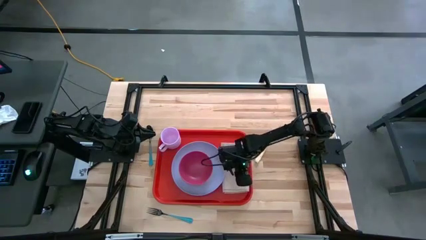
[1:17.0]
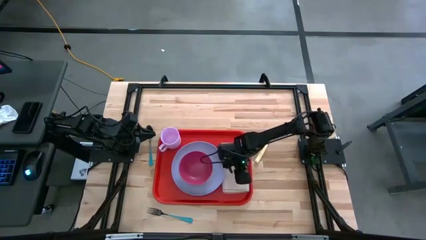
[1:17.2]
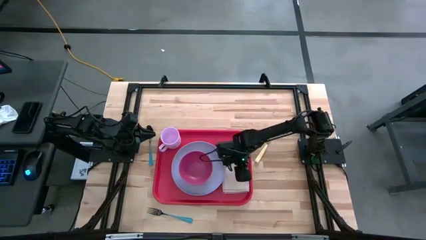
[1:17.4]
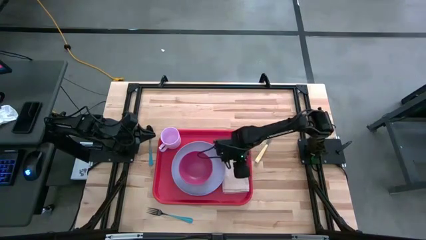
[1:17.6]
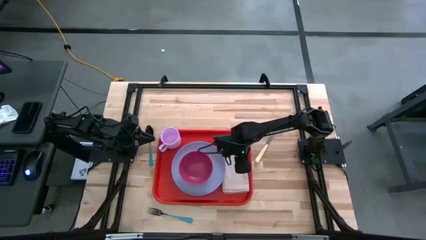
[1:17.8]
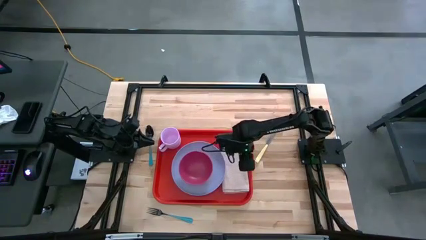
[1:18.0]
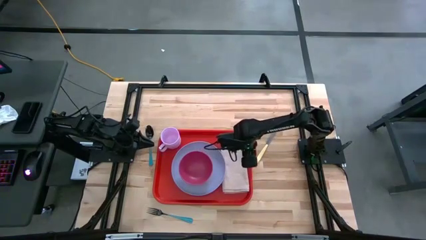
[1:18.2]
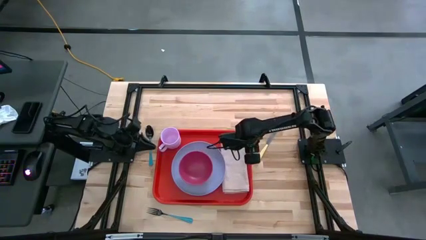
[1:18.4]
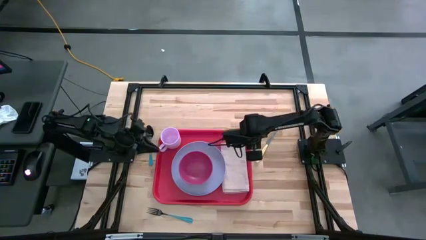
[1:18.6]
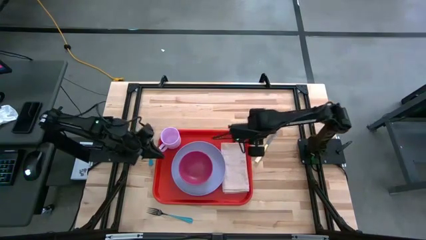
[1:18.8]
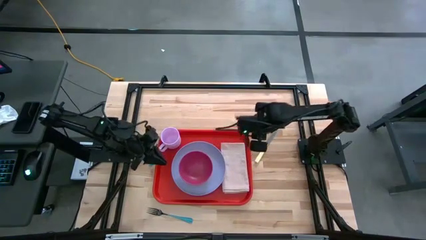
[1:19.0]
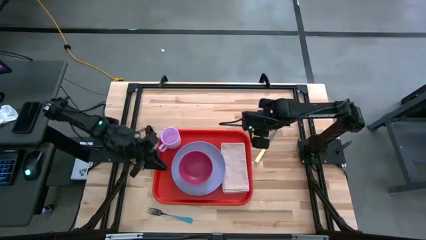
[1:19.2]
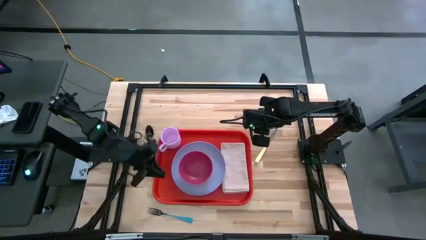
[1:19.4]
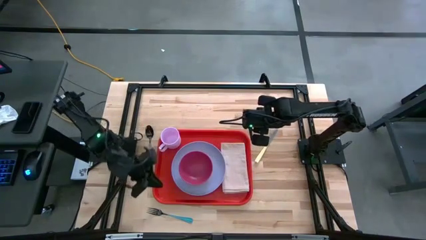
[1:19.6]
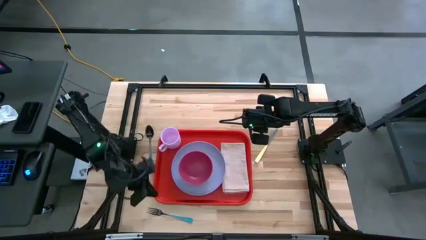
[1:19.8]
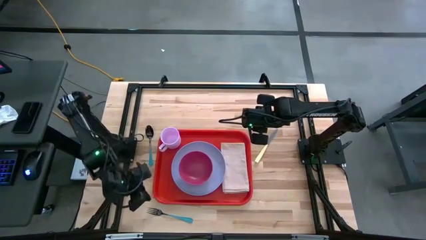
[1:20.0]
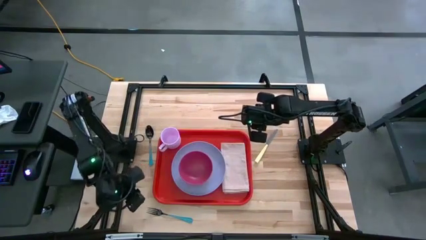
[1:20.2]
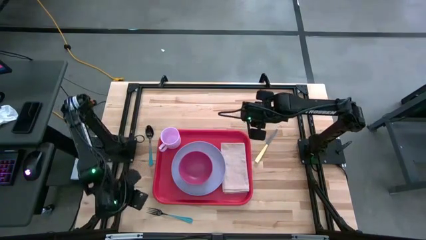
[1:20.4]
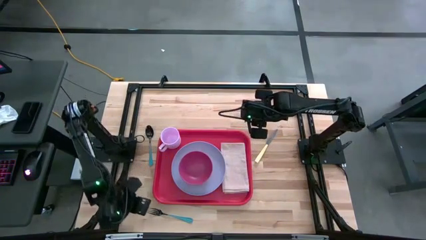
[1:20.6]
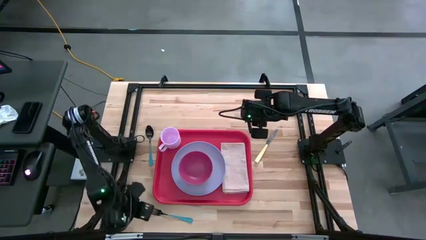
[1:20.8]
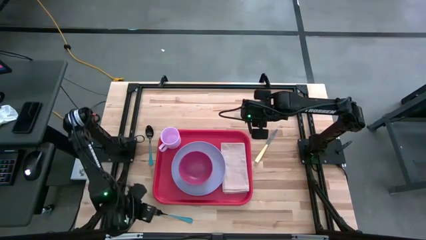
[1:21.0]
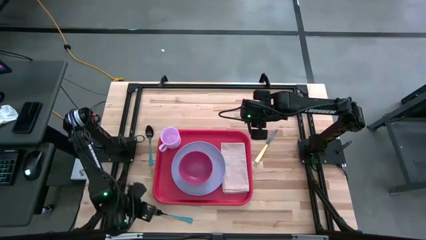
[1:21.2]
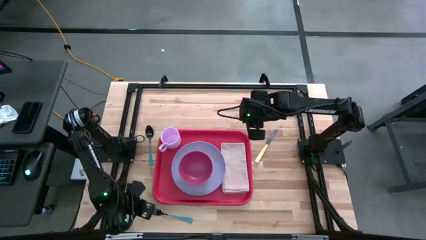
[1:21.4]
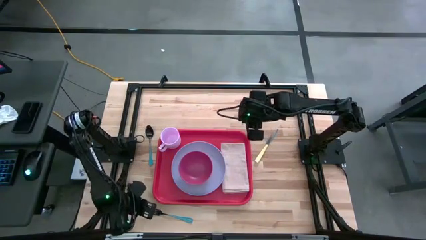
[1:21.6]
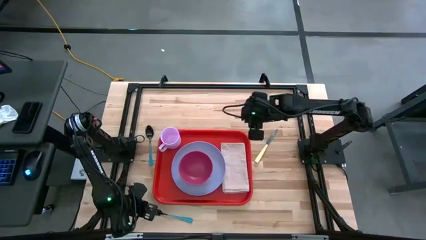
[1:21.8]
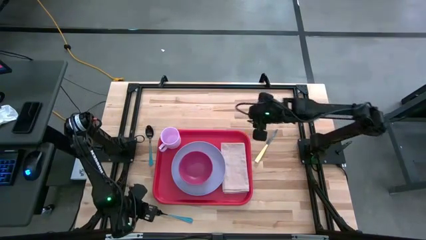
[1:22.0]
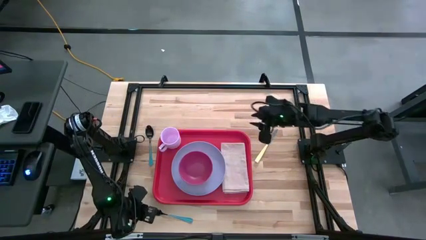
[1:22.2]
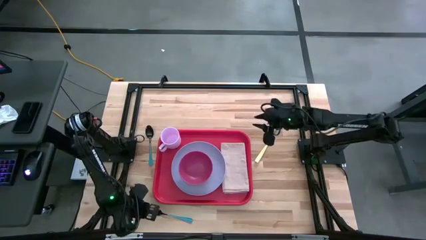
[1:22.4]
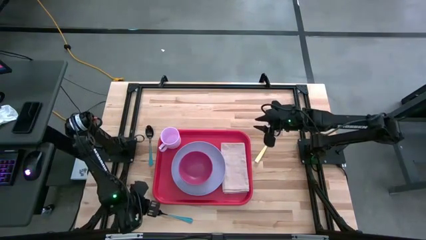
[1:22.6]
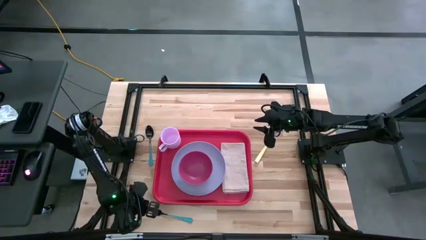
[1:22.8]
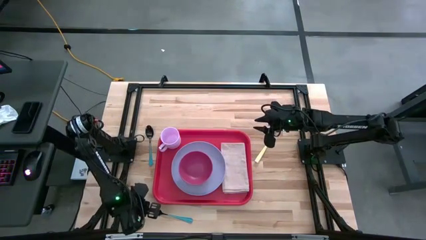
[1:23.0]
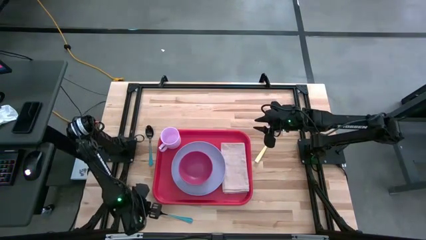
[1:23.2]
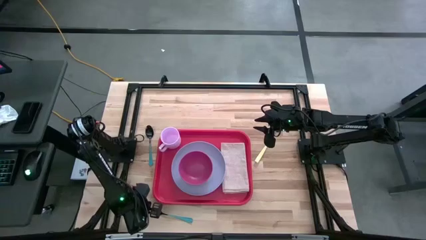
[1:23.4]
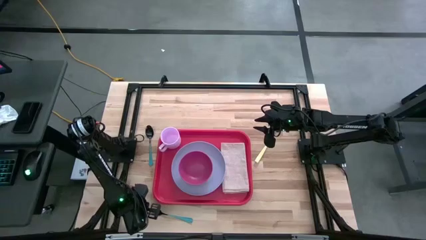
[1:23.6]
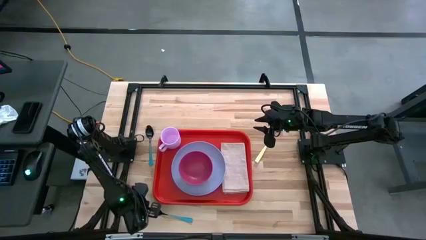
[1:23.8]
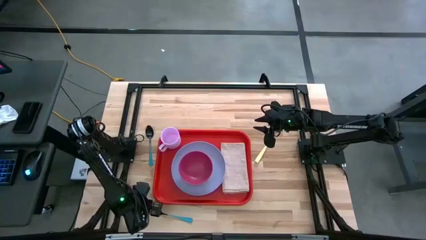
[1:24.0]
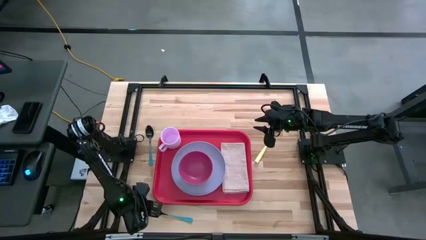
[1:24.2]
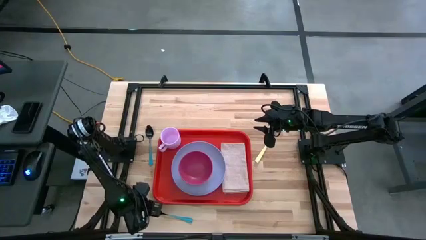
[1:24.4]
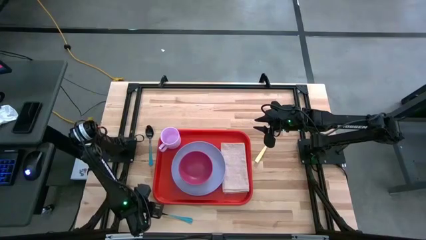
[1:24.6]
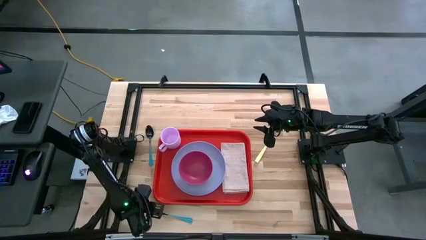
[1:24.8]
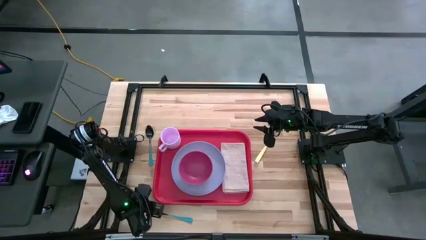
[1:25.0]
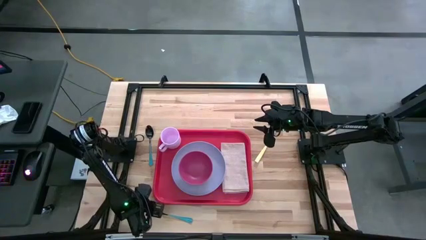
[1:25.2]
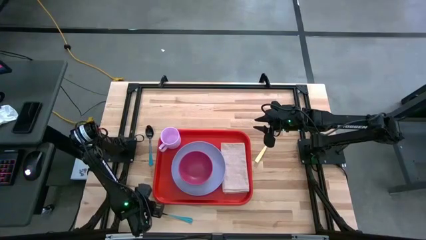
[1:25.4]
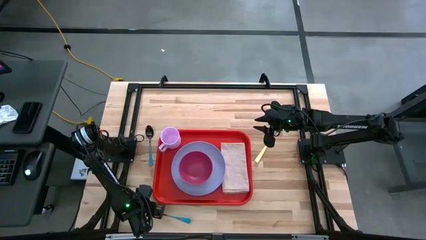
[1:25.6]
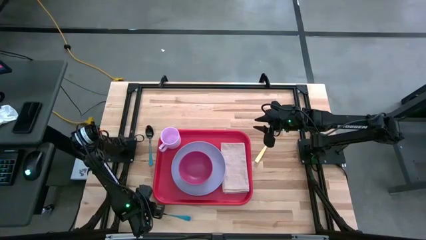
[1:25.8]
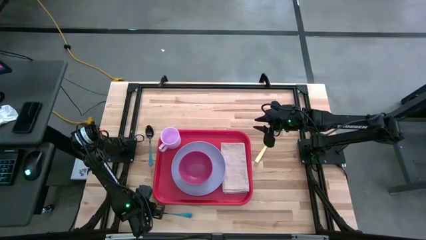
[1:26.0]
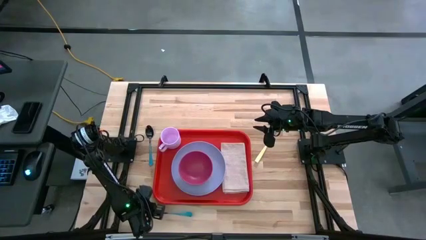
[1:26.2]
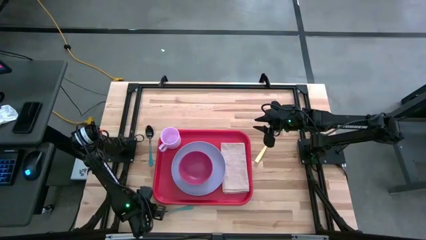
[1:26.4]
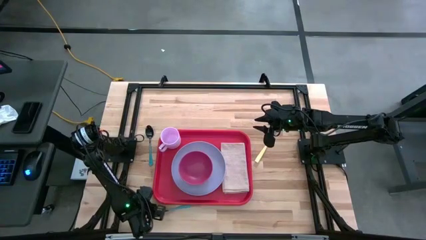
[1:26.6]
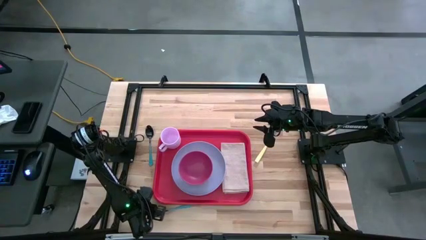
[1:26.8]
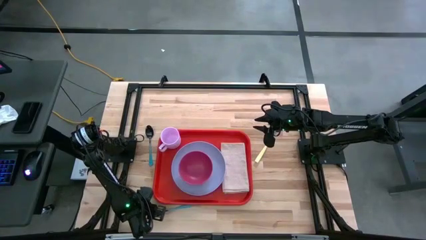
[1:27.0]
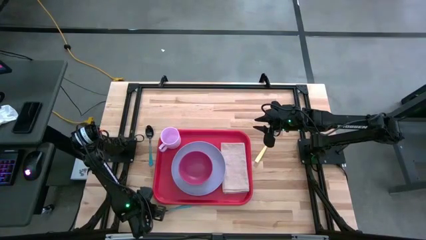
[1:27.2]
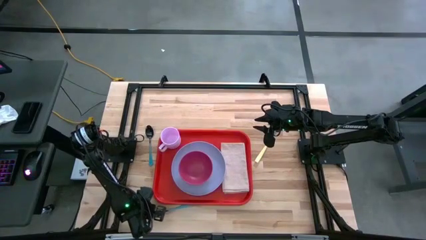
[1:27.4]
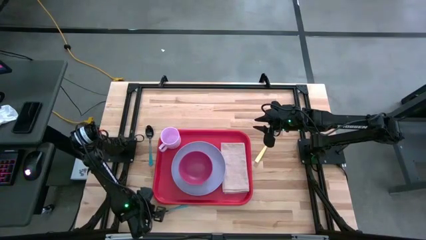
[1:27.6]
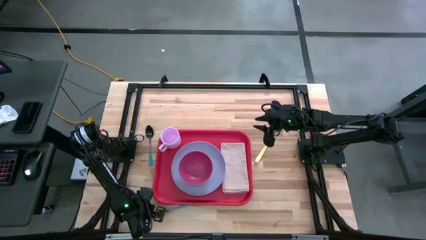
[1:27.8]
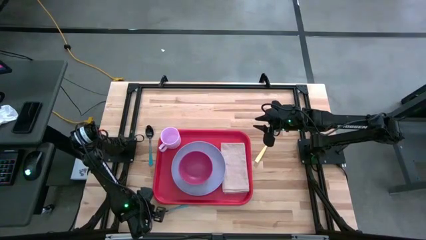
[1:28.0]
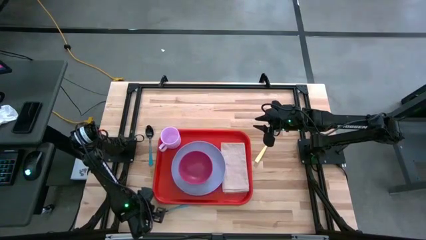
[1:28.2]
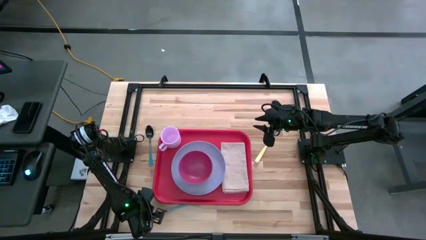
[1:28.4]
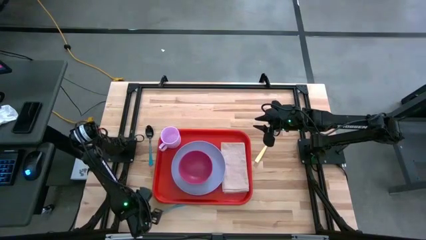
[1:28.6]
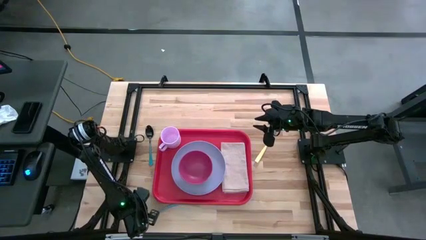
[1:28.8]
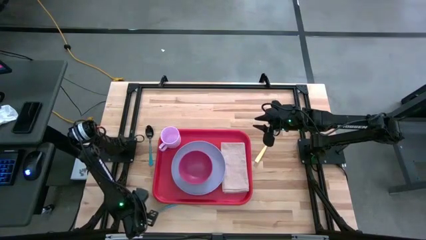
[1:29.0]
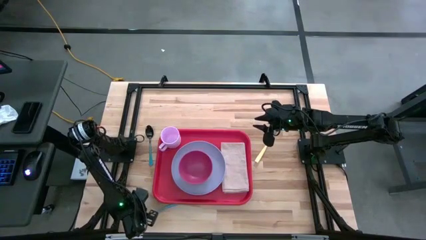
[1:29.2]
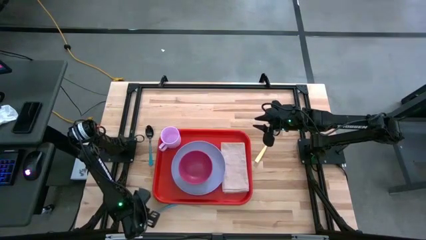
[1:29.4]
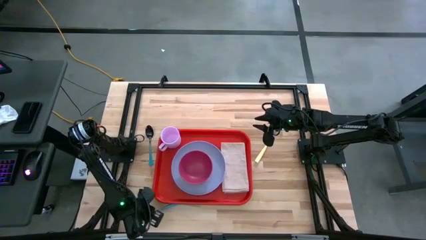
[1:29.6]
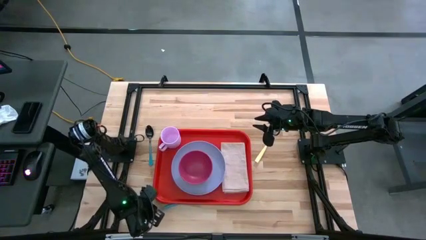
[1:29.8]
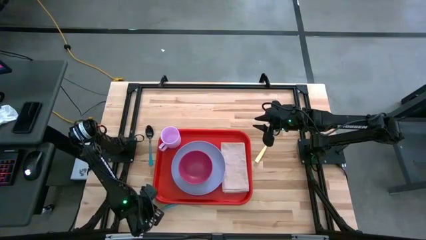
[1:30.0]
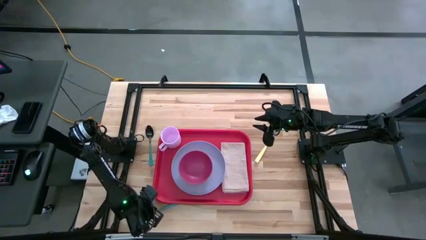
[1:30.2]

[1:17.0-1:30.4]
Task: Set up tray
Put the blue fork on the gray napkin

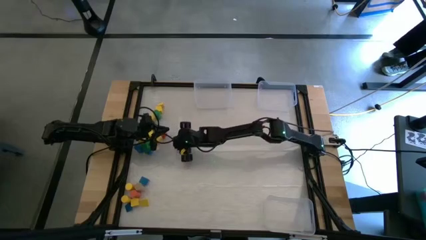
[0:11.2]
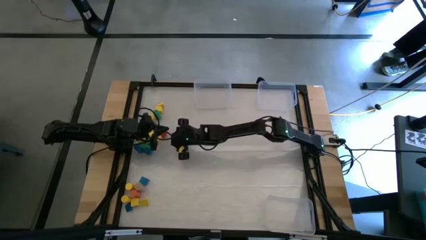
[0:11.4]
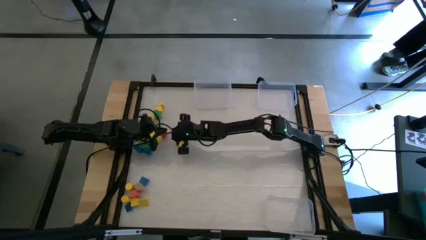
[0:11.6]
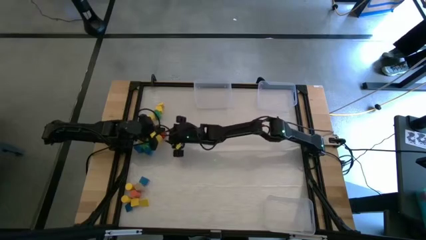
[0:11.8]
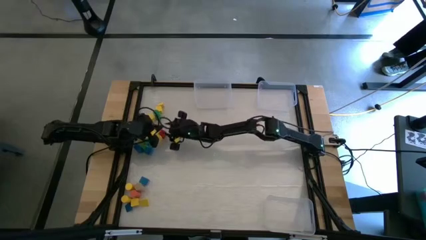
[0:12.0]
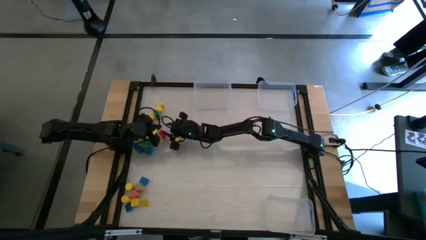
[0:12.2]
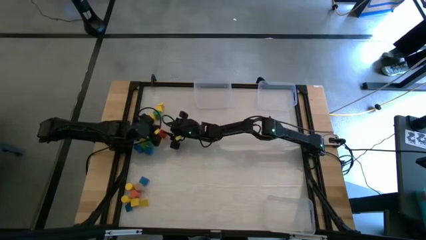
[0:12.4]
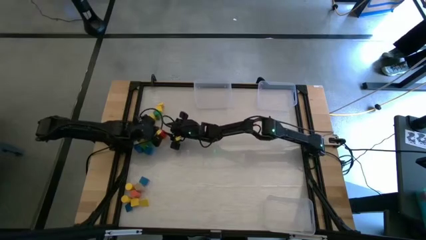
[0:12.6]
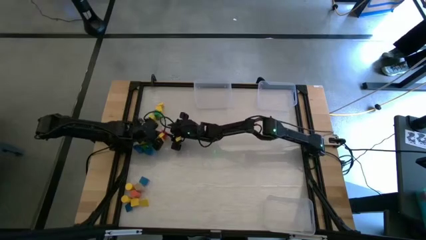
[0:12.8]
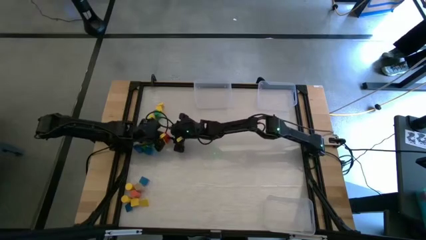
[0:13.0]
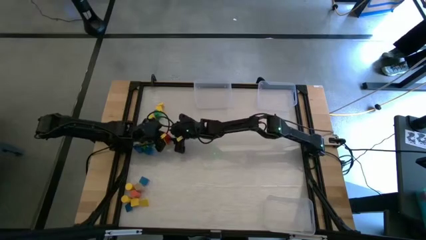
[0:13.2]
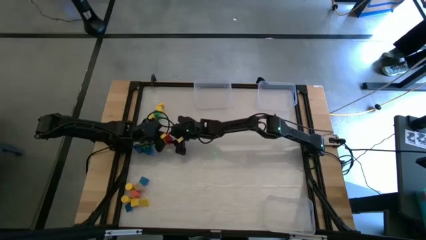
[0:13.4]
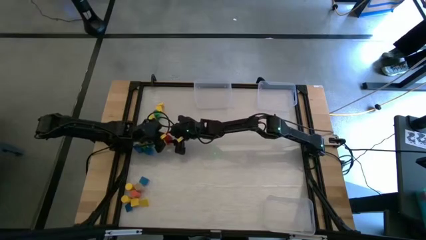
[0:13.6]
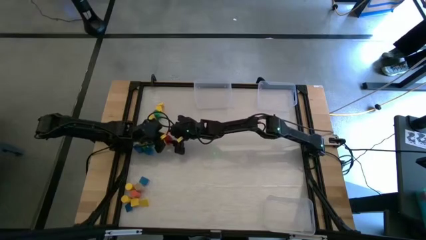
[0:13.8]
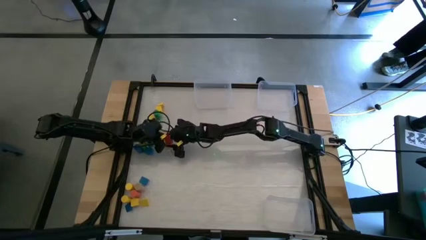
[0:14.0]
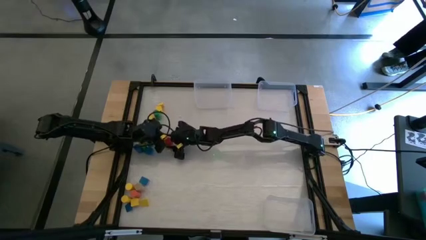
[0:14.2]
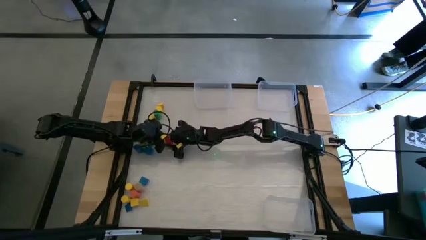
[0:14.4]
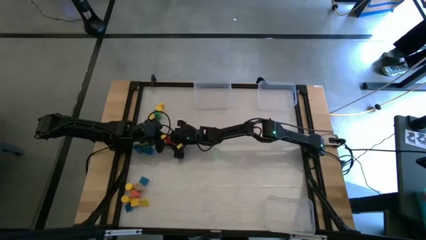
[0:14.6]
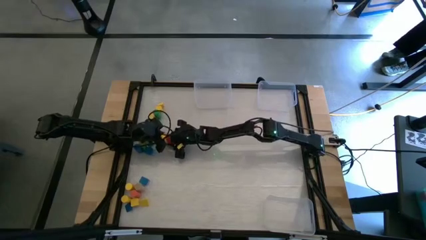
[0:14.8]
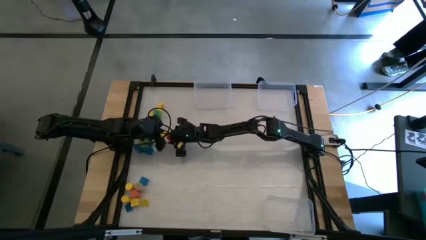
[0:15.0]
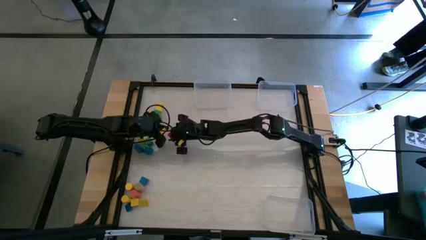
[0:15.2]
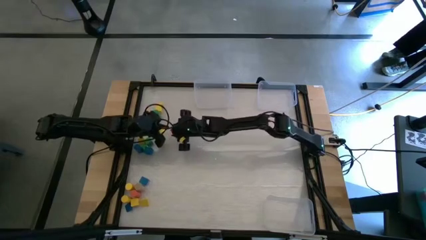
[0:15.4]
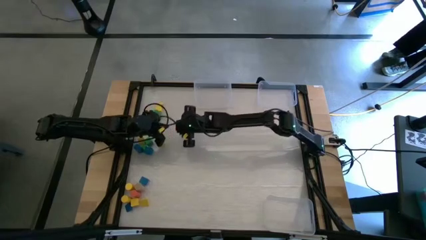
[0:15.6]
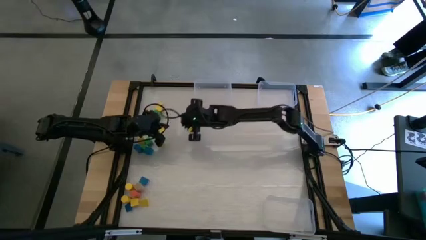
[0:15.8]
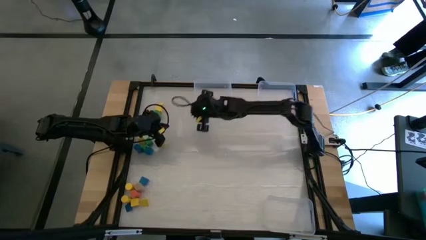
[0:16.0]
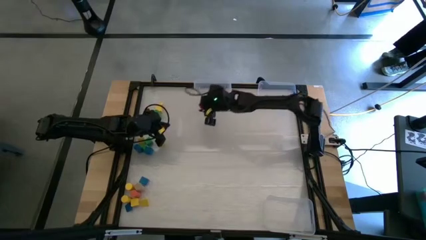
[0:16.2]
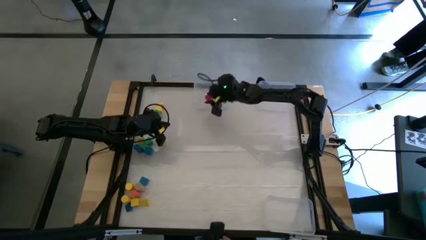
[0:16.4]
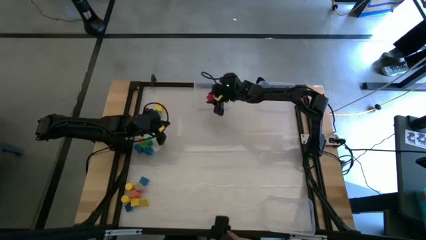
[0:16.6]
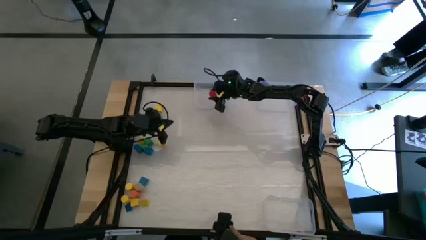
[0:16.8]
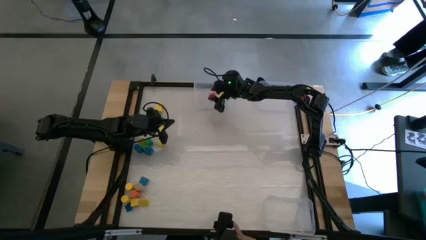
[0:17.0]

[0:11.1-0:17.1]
Task: Sort blocks by size
Put the square red block into the top left transparent bin
